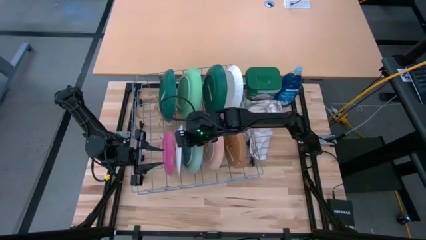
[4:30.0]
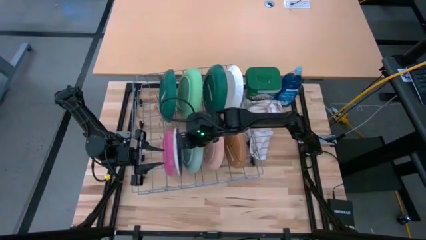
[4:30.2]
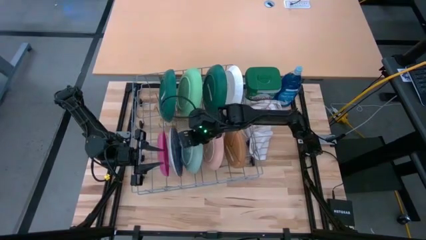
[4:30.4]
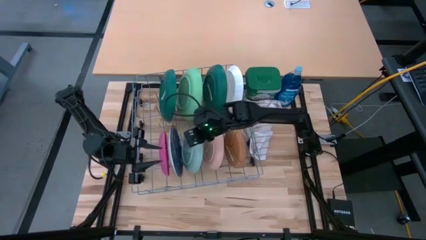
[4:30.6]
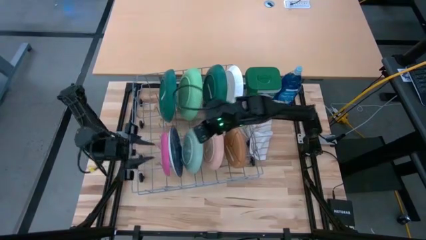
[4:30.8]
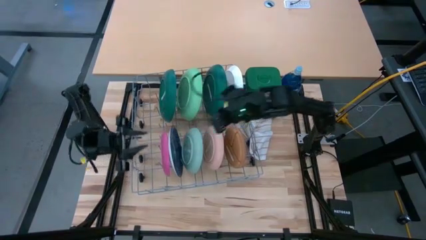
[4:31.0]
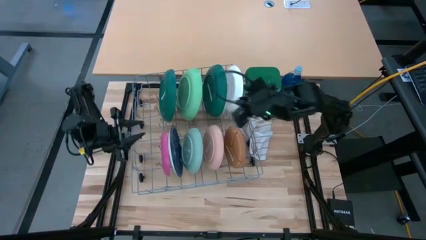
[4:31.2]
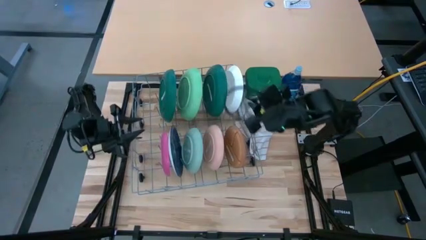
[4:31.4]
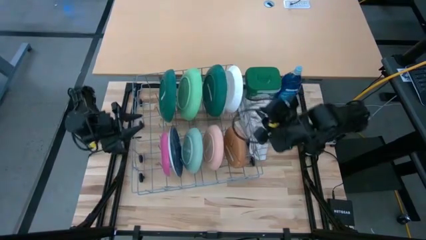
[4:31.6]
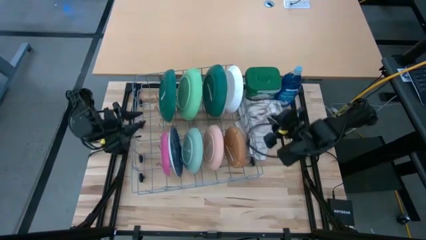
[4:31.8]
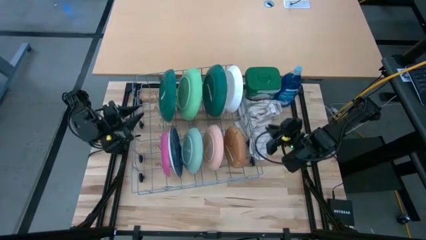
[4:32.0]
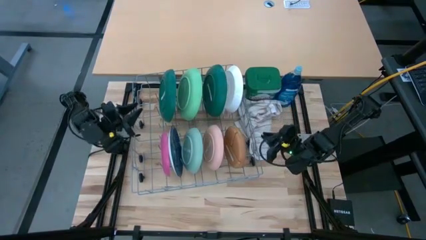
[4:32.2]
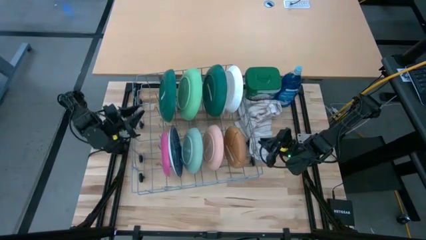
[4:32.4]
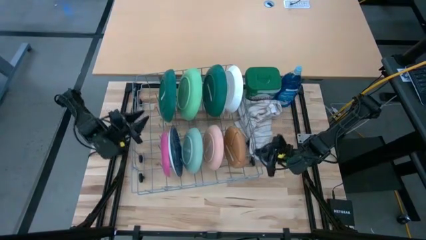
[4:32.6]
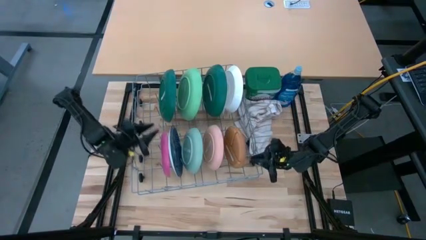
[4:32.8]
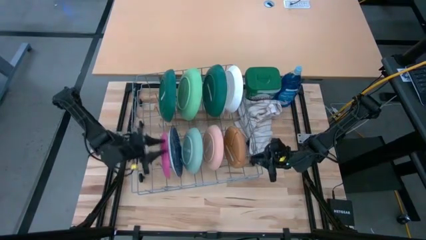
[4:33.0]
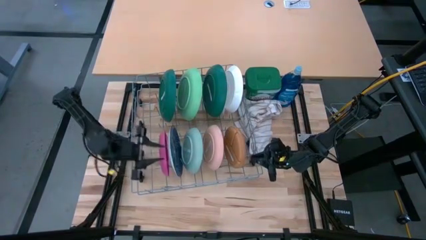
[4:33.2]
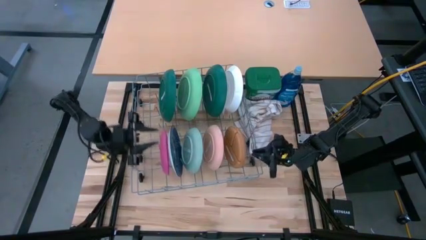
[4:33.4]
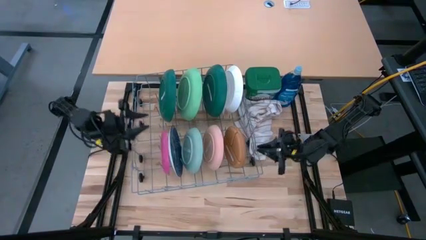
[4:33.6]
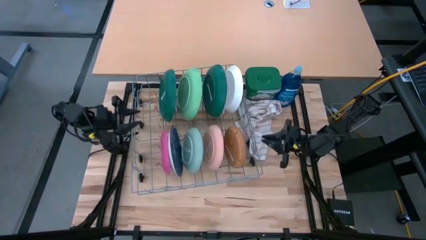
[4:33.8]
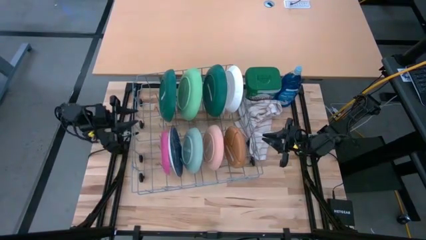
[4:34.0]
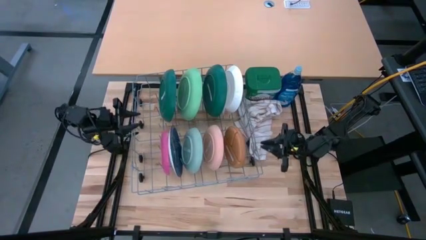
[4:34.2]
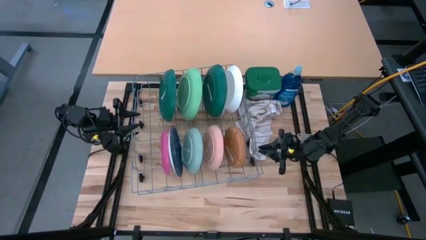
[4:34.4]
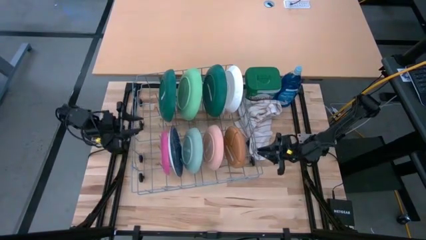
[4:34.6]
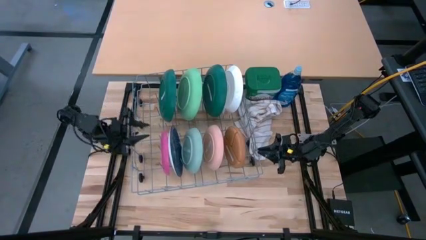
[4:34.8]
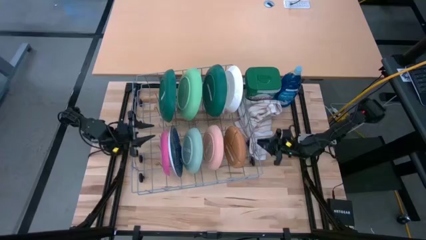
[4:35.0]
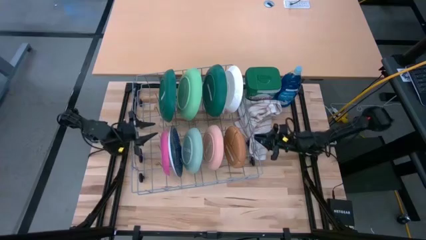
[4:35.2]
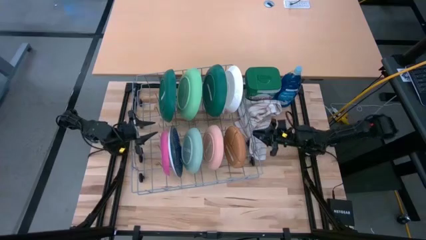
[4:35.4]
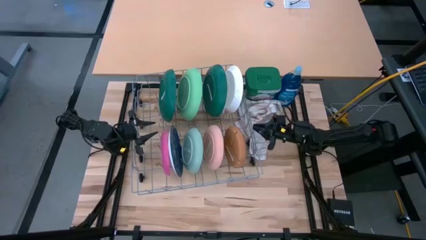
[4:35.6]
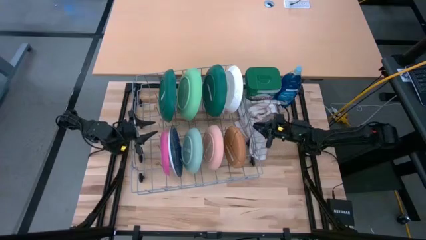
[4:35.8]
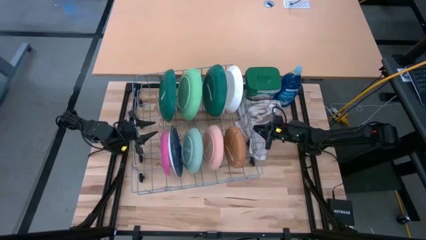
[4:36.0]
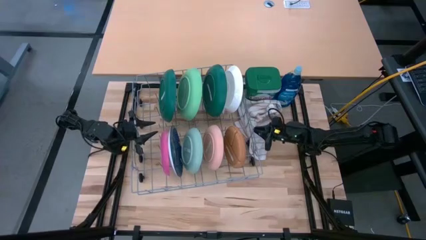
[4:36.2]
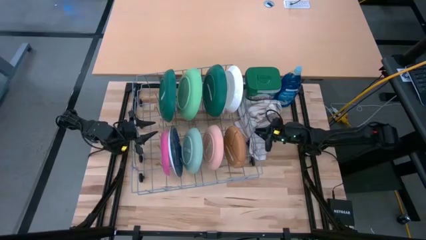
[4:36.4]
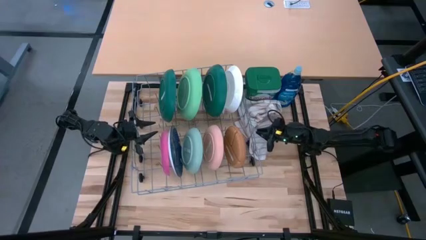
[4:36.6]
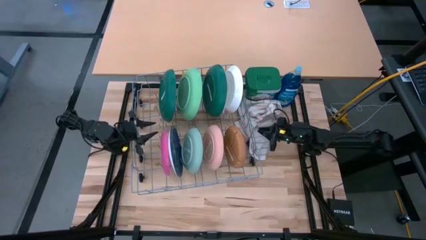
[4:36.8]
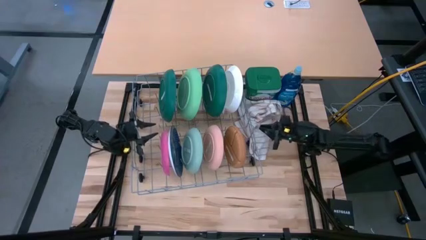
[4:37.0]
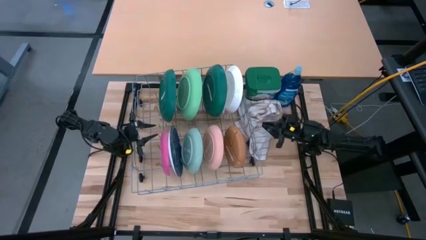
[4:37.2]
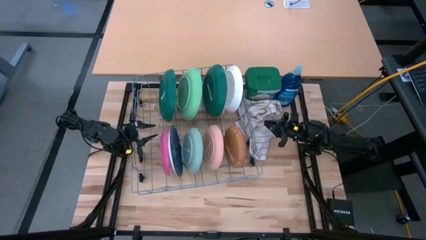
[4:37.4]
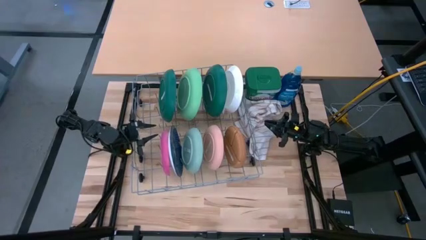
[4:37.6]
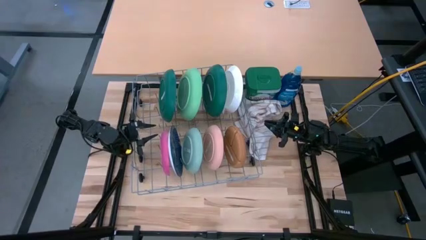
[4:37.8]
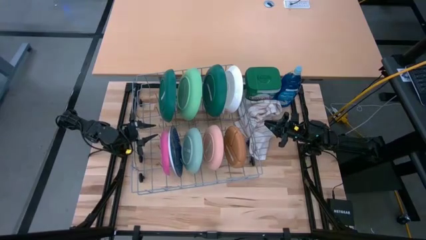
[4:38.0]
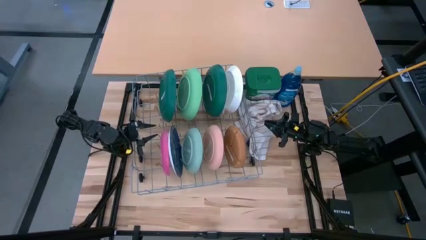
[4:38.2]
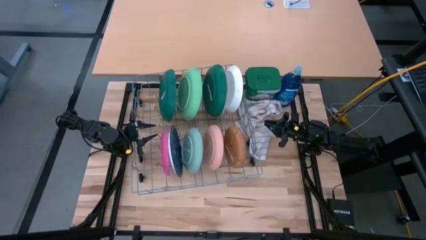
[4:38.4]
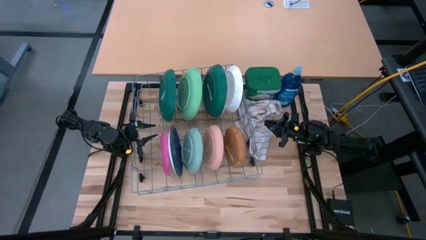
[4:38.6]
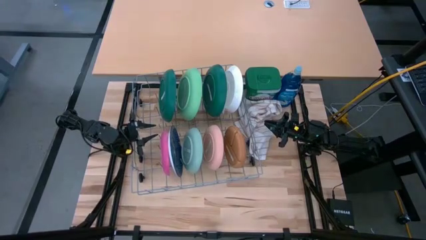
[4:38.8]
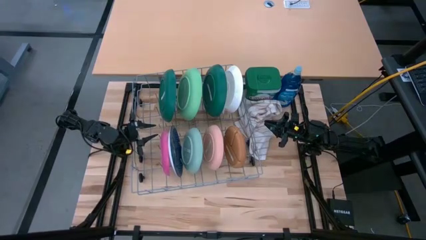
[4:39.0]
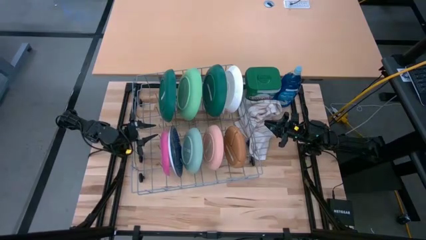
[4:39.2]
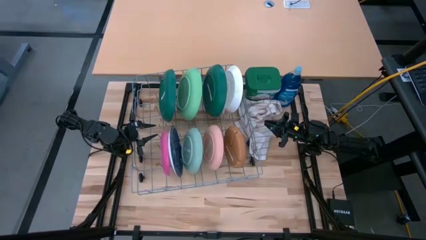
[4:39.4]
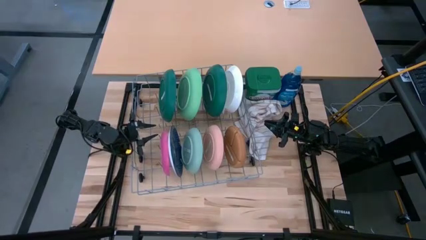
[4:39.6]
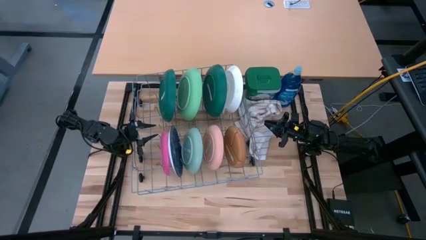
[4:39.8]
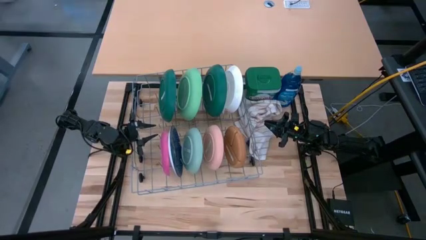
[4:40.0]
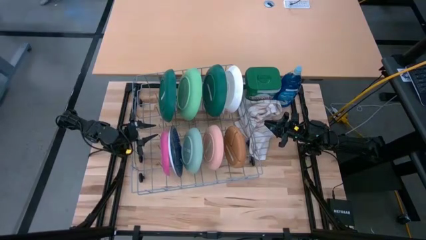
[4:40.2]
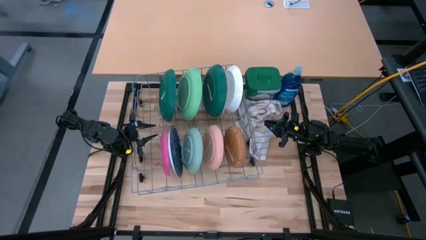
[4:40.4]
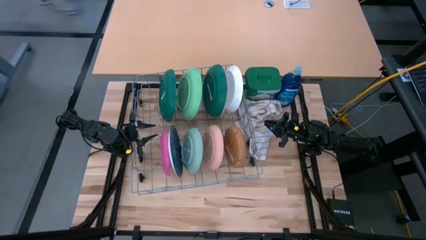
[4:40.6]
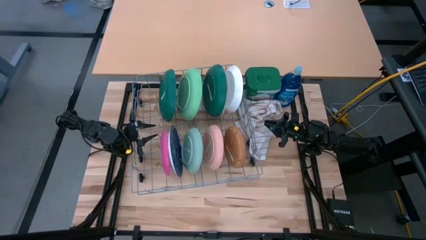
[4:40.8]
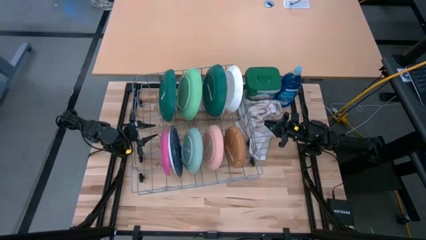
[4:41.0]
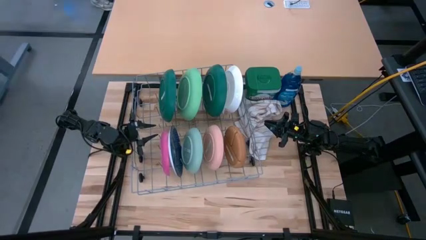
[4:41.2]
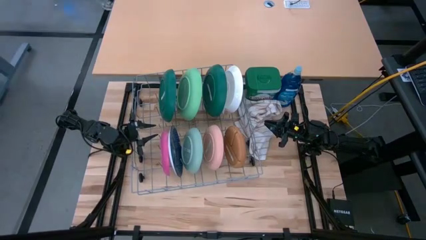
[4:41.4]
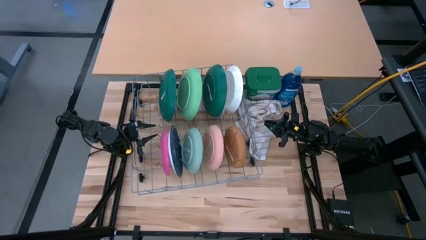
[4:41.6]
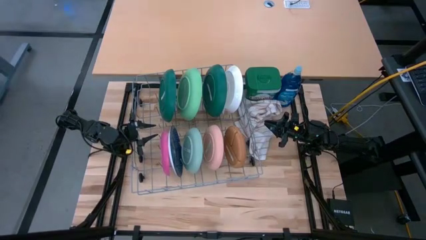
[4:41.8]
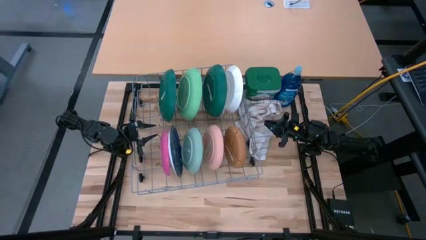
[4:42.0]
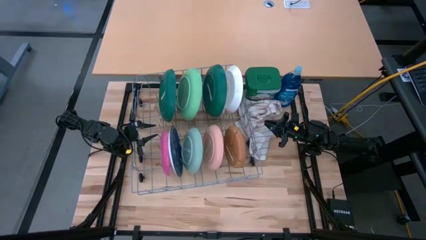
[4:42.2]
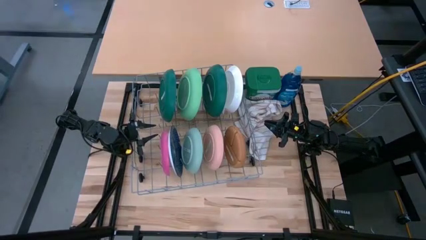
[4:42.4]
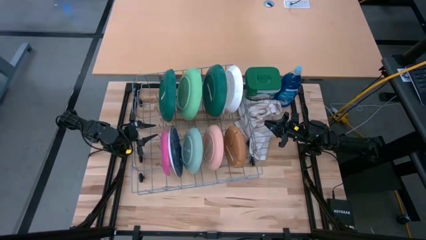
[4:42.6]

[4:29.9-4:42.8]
Task: Sort dishes
Return to Home Position
